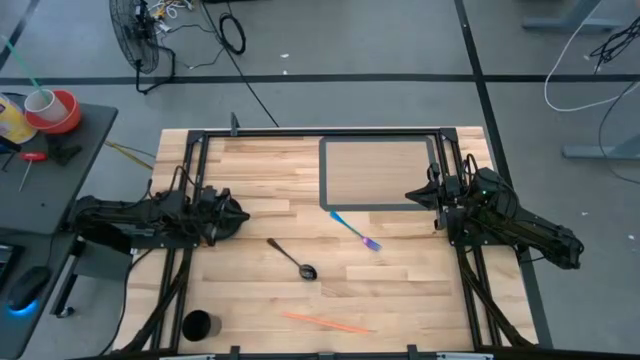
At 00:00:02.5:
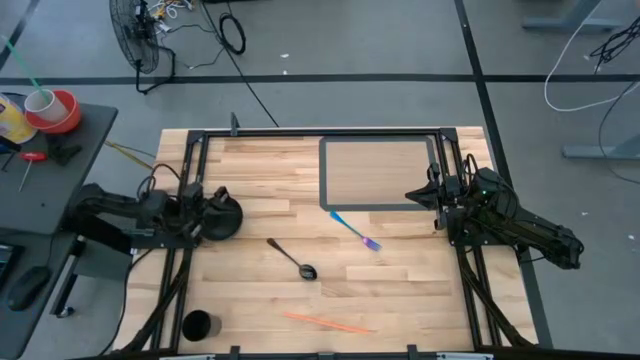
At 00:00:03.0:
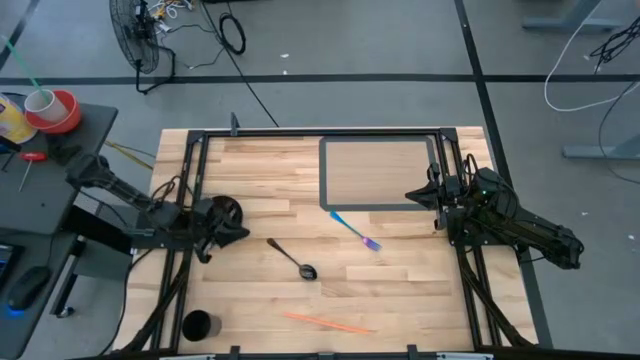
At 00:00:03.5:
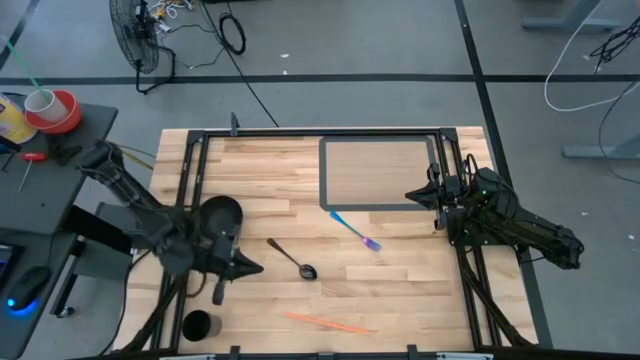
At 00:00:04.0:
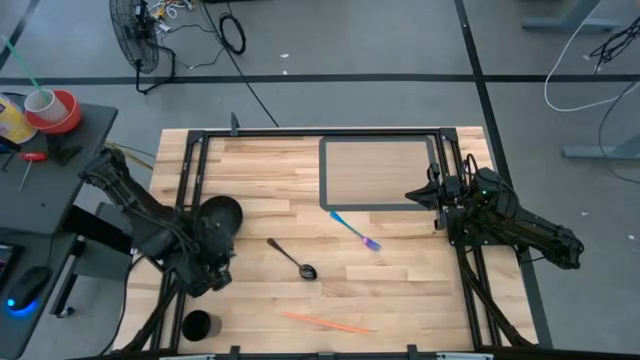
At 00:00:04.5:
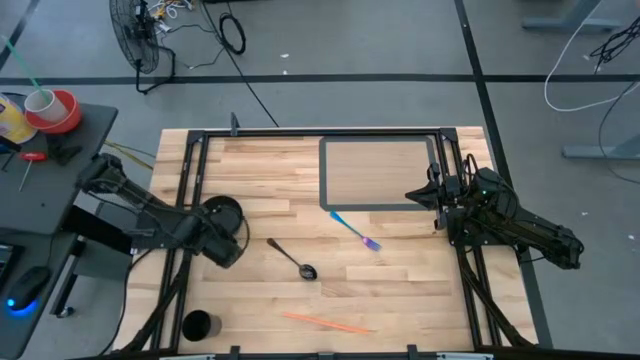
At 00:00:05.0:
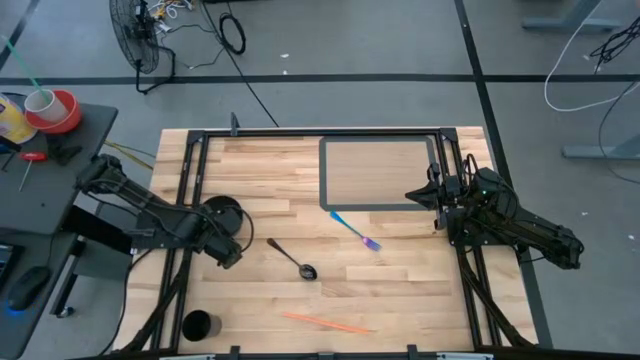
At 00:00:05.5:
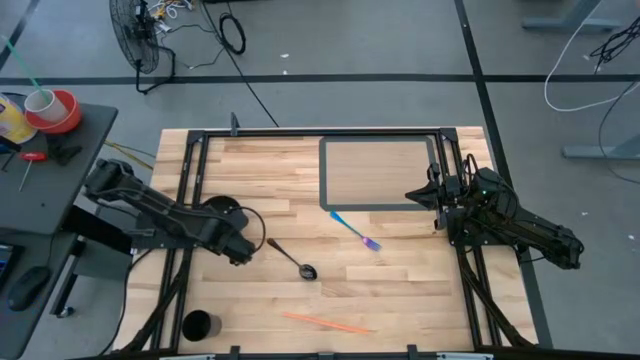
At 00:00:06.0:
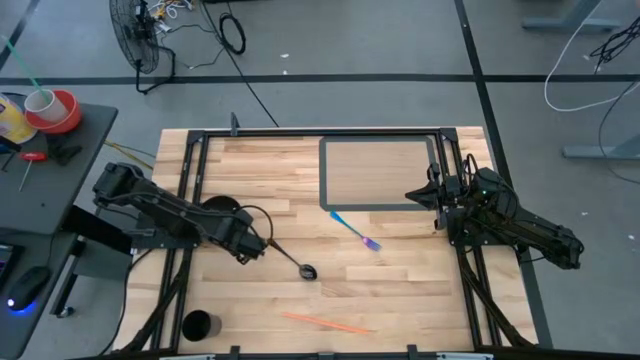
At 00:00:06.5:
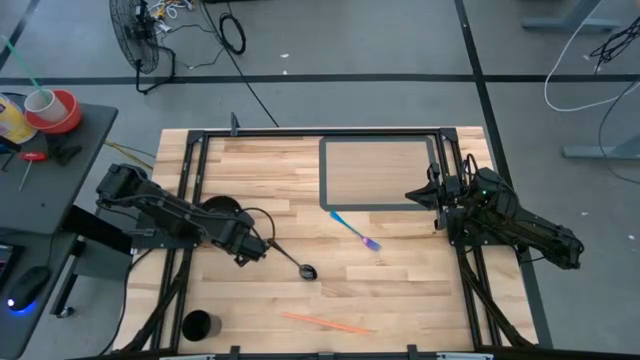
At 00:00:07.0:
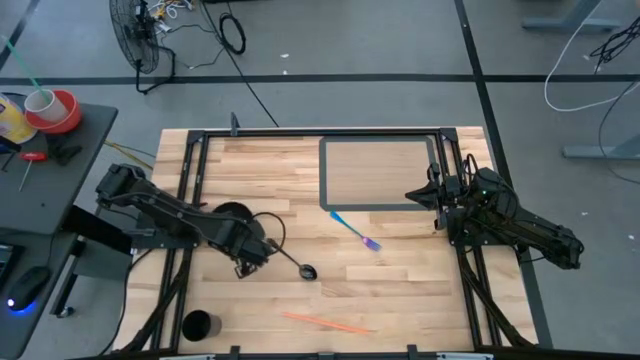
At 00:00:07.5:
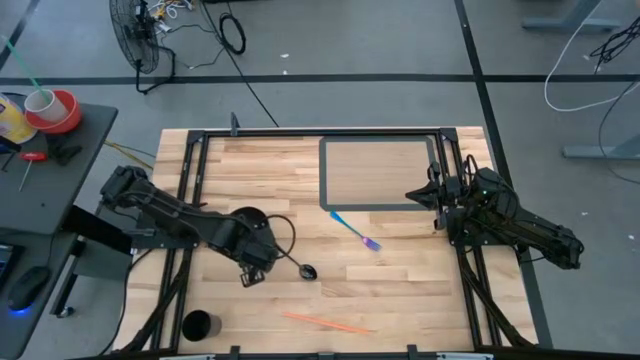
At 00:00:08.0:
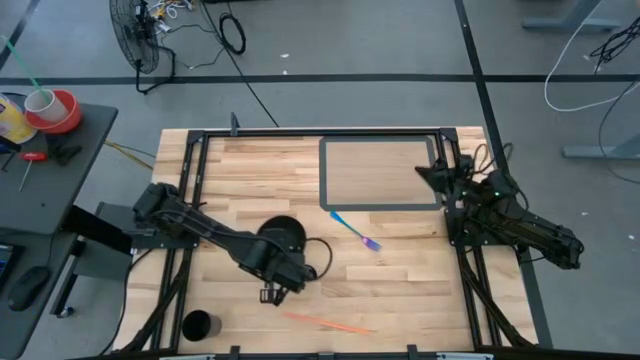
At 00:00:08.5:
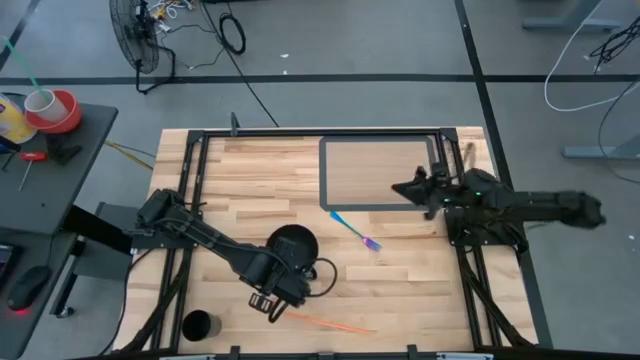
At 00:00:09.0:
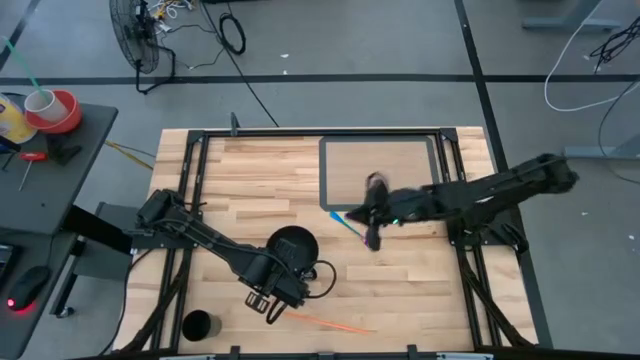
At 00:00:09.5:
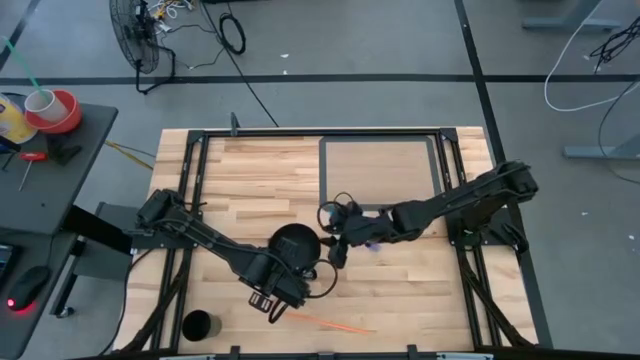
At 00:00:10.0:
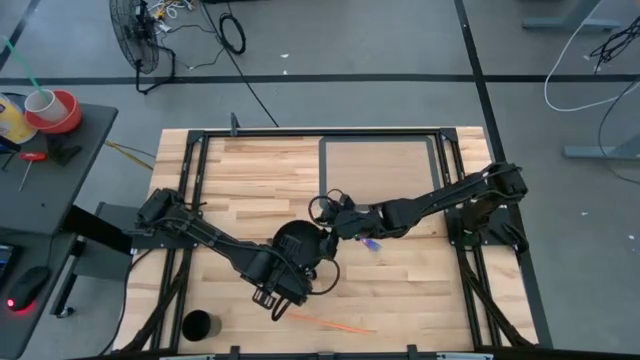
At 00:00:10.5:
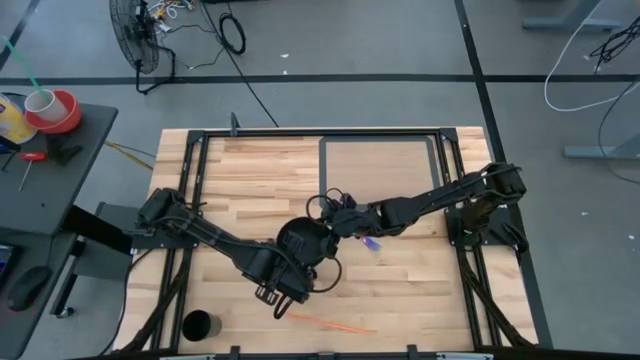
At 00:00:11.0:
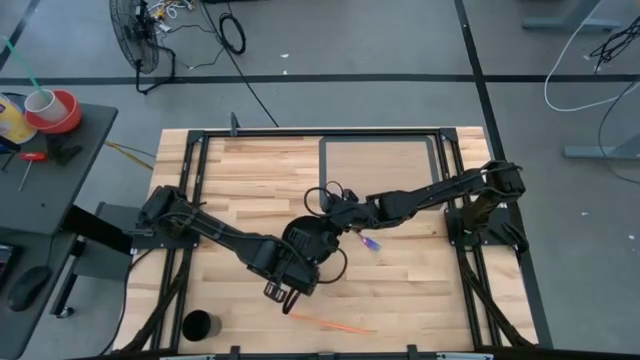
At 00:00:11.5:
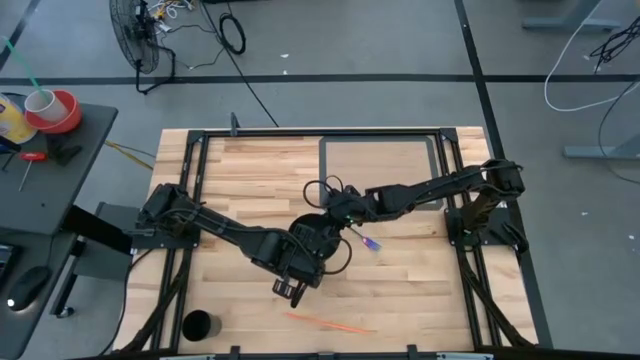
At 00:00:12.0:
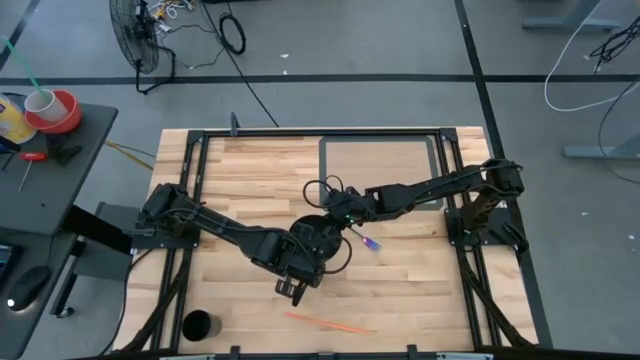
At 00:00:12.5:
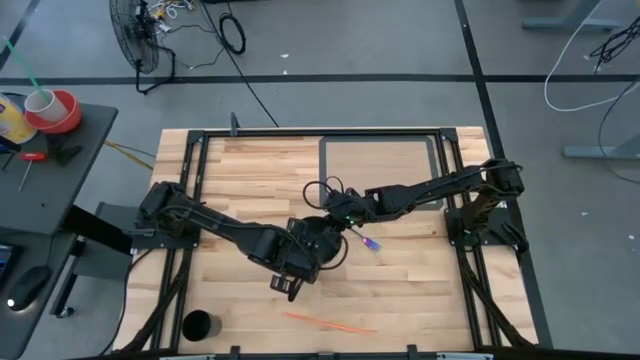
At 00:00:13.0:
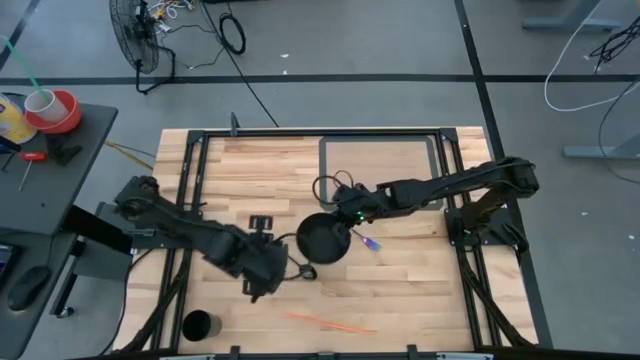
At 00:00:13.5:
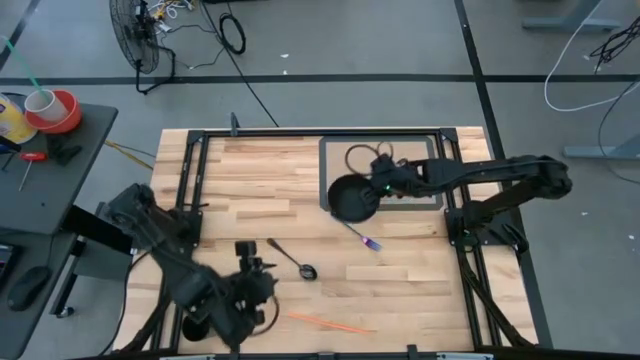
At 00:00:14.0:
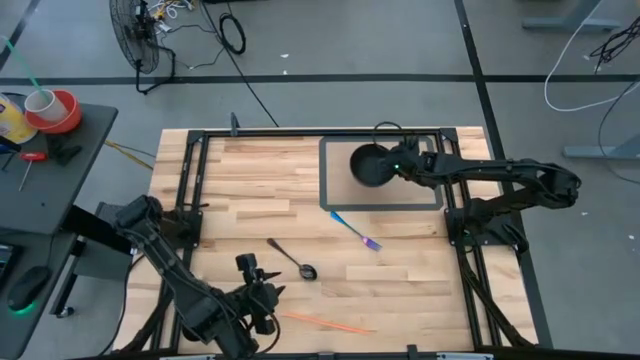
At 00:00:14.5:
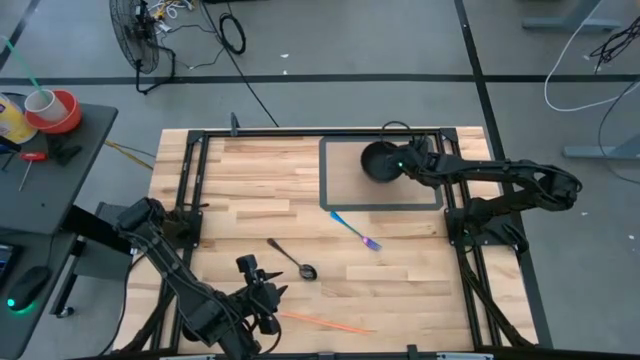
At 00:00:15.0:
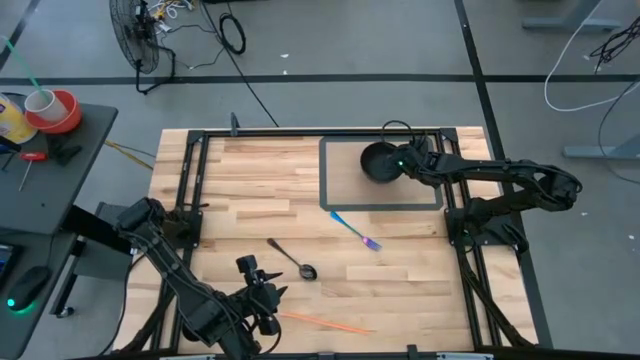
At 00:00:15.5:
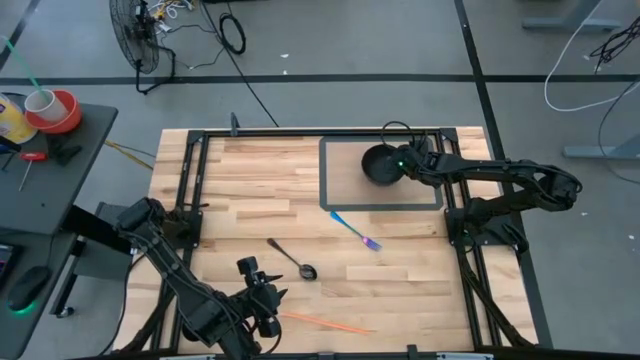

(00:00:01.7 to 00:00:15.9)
Task: Pick & Place Utensil
Put the black bowl on the transparent mat
